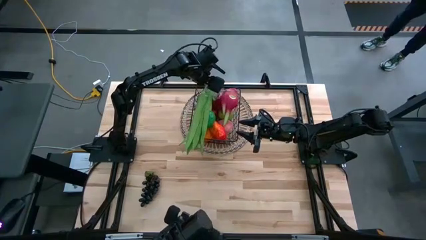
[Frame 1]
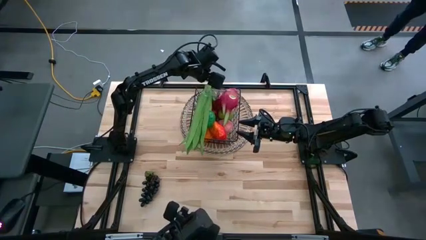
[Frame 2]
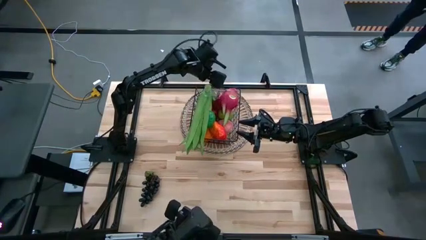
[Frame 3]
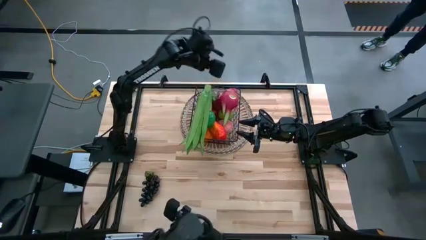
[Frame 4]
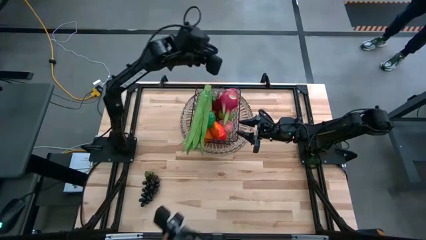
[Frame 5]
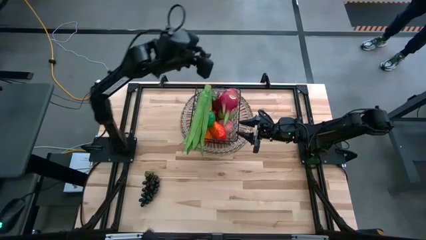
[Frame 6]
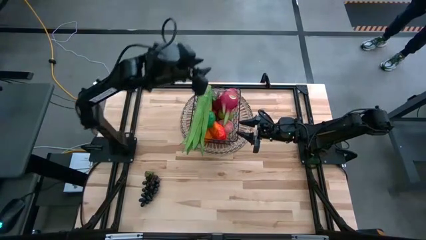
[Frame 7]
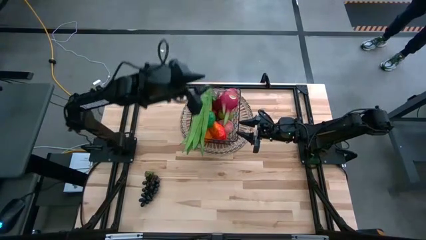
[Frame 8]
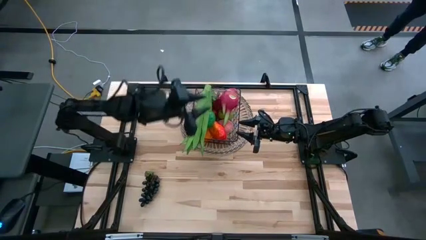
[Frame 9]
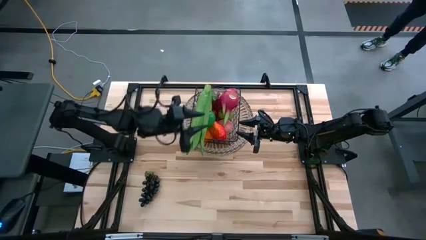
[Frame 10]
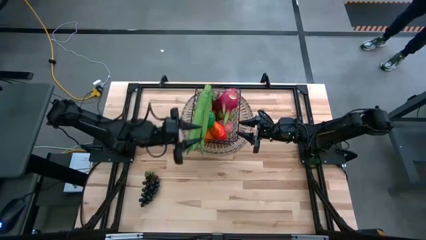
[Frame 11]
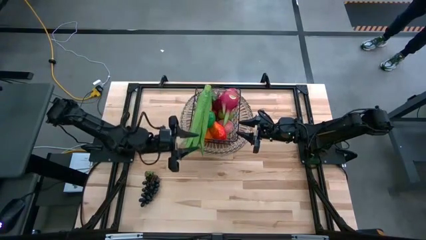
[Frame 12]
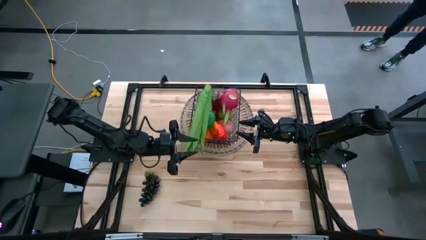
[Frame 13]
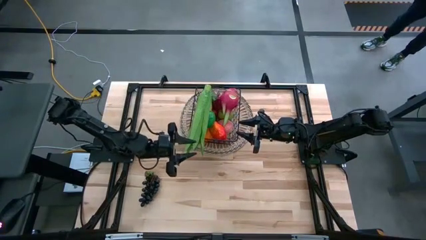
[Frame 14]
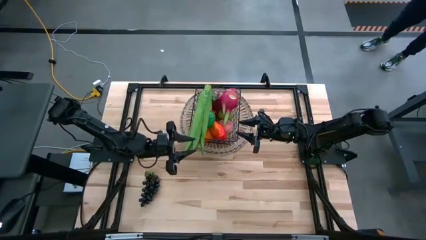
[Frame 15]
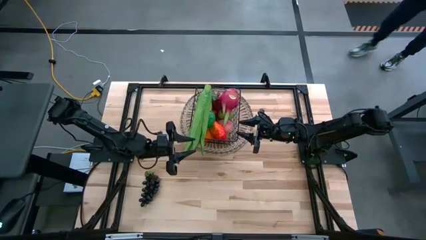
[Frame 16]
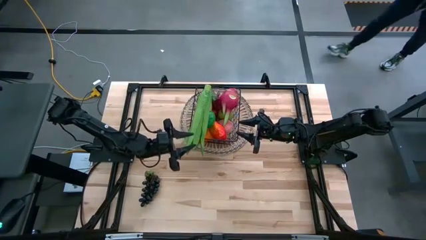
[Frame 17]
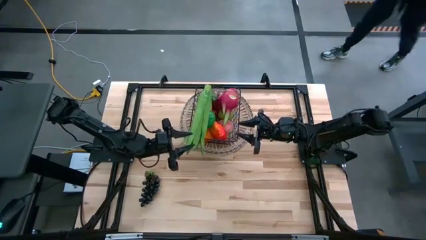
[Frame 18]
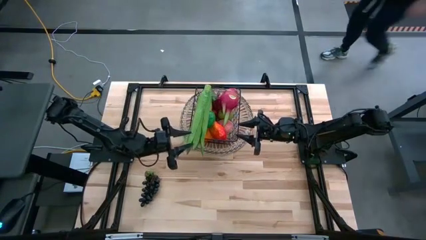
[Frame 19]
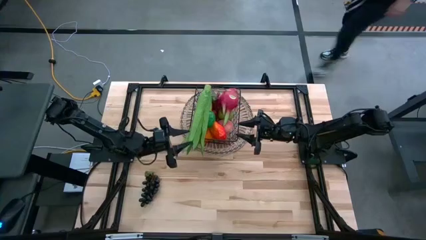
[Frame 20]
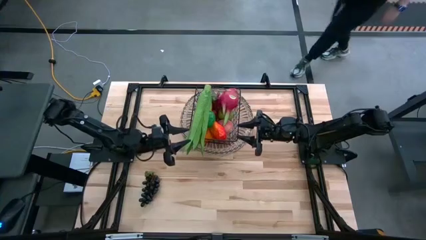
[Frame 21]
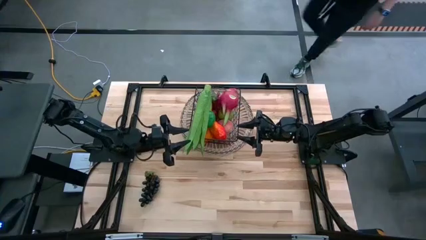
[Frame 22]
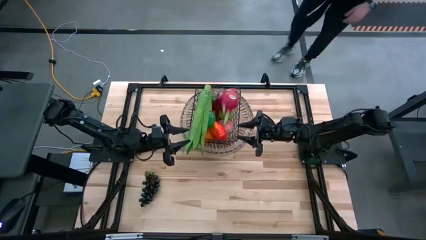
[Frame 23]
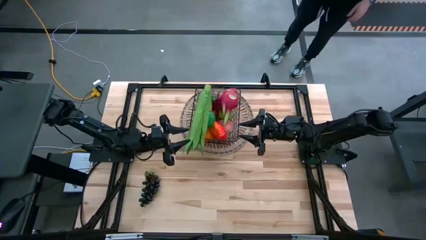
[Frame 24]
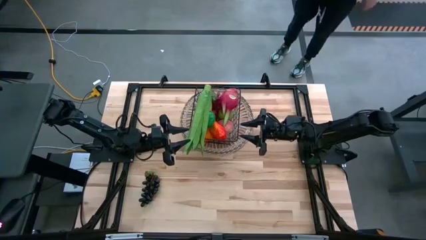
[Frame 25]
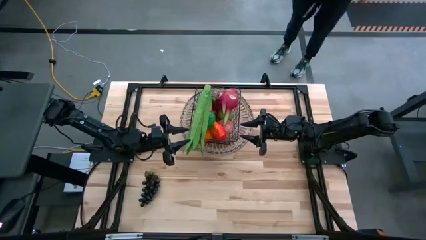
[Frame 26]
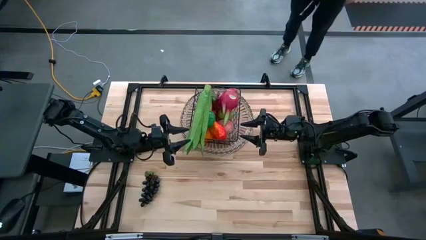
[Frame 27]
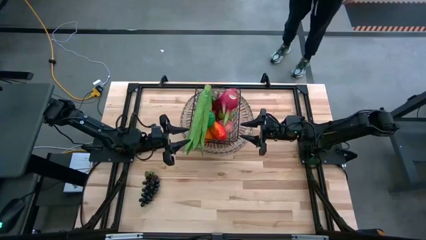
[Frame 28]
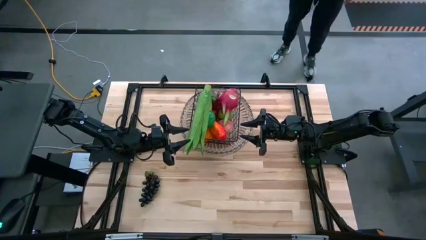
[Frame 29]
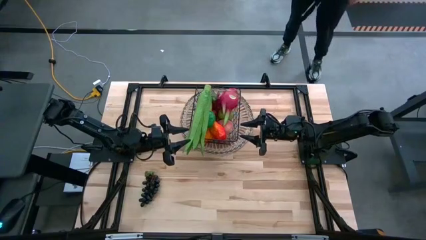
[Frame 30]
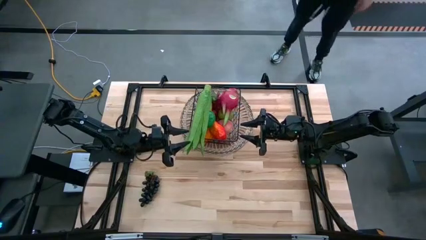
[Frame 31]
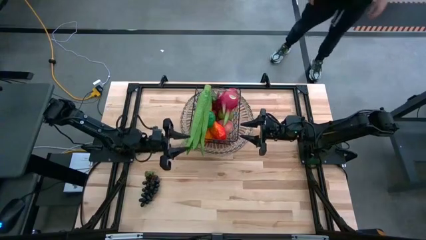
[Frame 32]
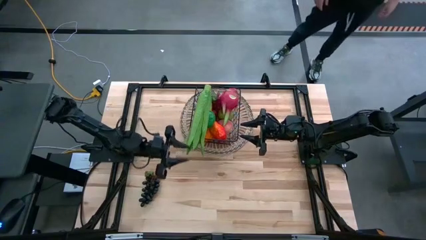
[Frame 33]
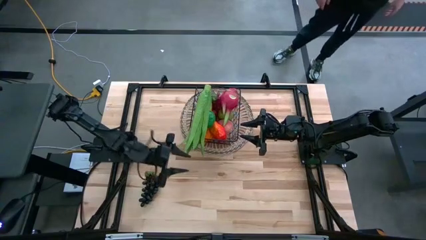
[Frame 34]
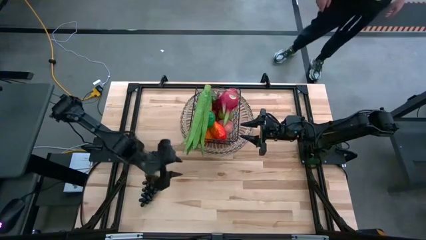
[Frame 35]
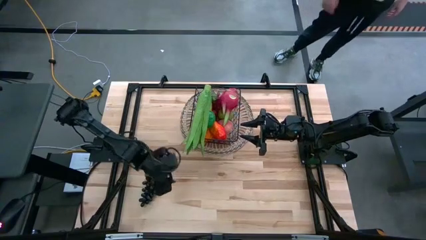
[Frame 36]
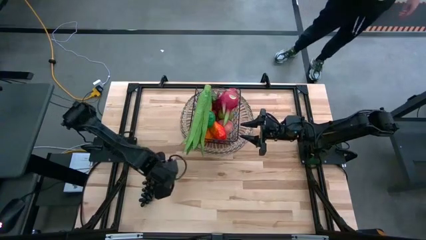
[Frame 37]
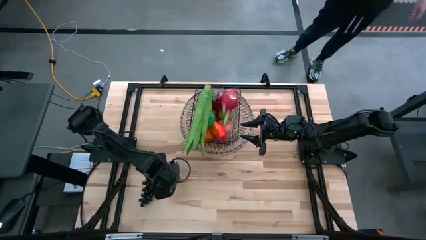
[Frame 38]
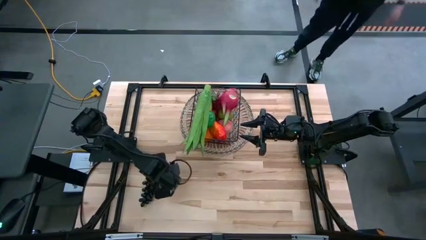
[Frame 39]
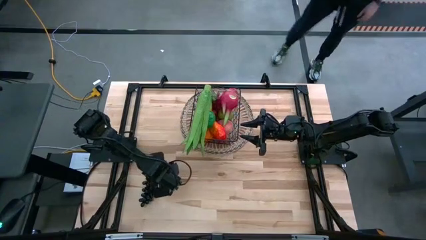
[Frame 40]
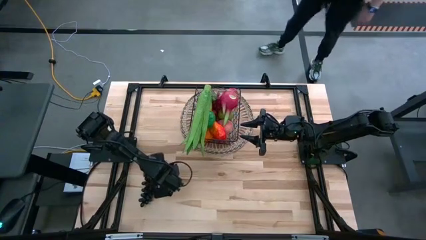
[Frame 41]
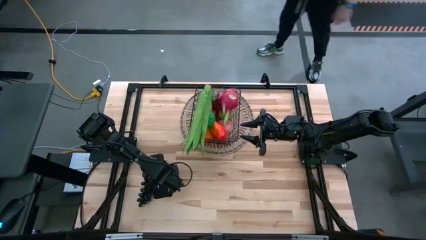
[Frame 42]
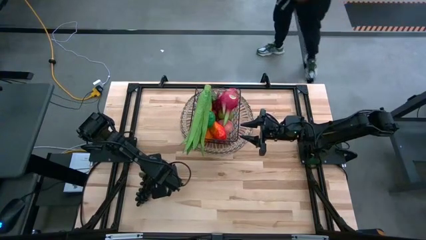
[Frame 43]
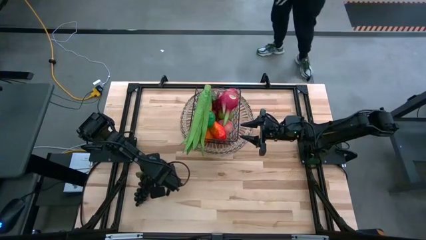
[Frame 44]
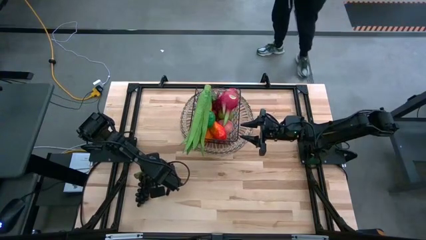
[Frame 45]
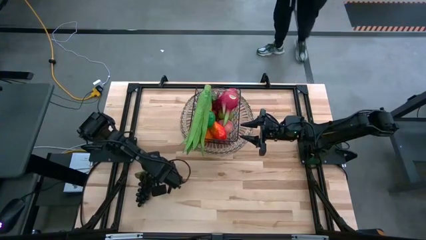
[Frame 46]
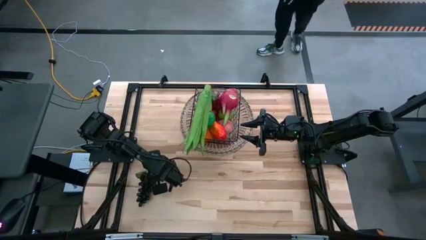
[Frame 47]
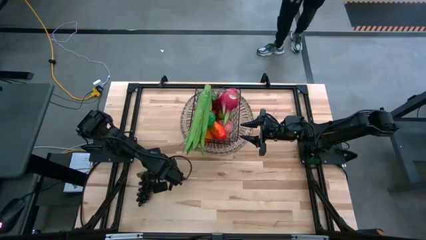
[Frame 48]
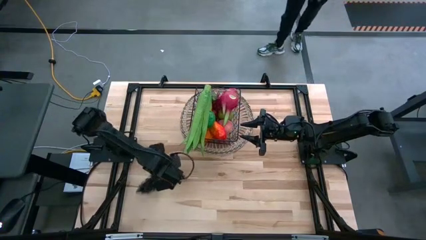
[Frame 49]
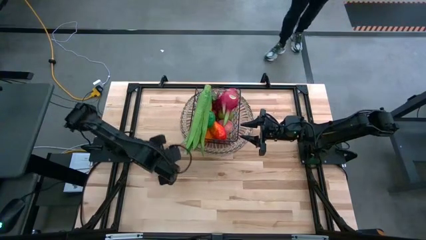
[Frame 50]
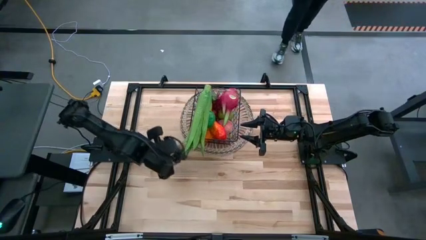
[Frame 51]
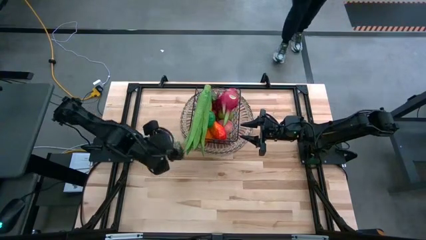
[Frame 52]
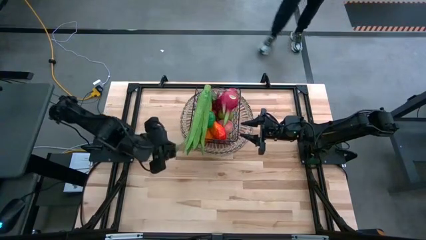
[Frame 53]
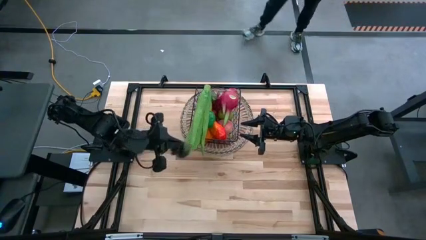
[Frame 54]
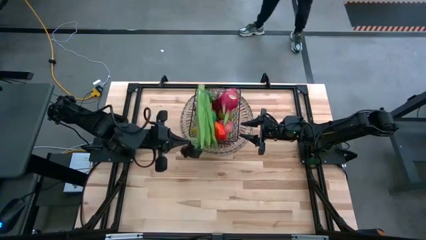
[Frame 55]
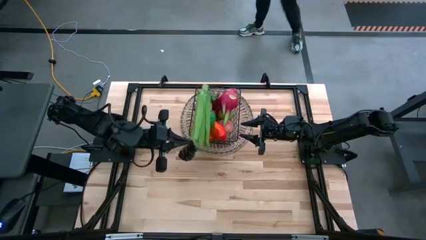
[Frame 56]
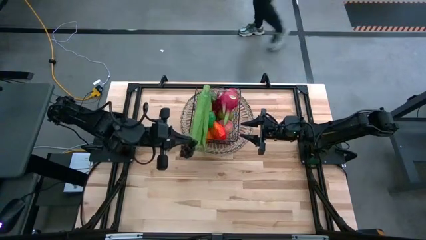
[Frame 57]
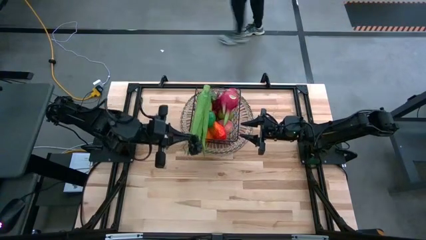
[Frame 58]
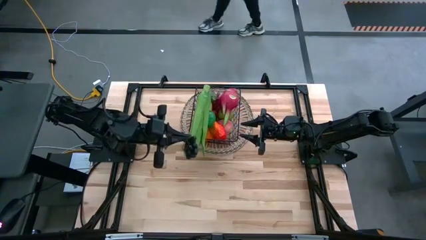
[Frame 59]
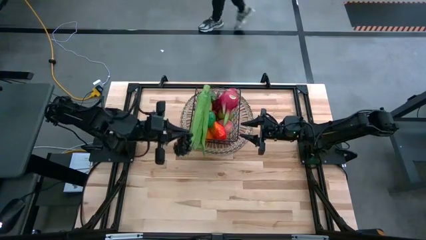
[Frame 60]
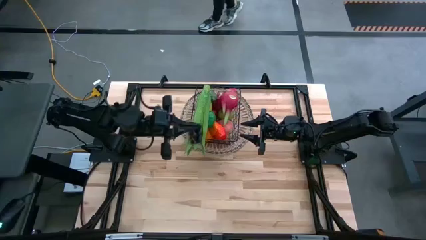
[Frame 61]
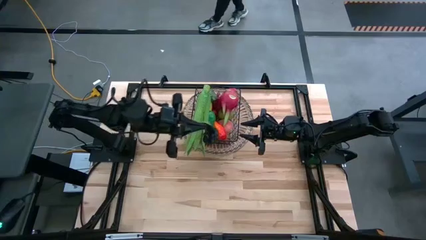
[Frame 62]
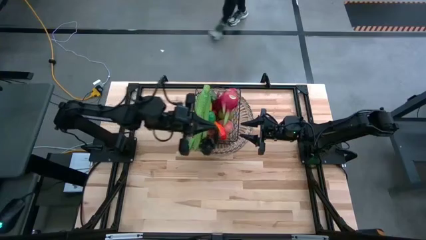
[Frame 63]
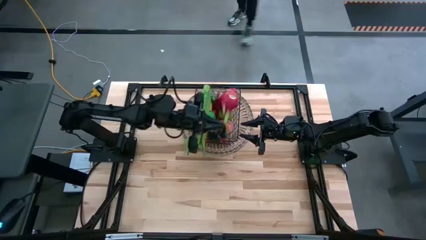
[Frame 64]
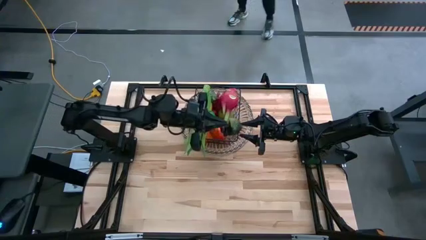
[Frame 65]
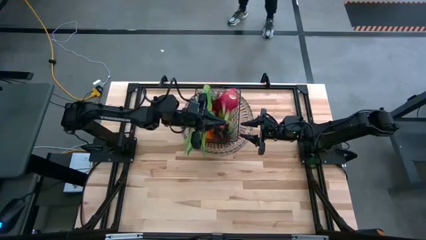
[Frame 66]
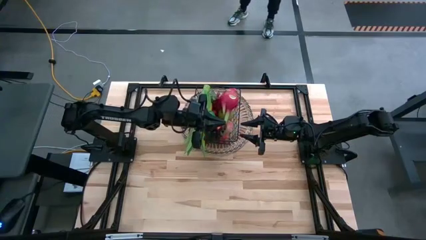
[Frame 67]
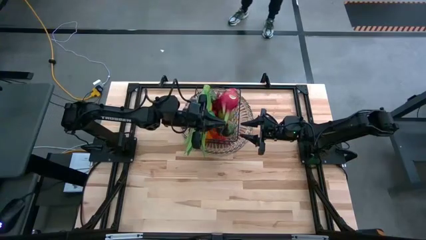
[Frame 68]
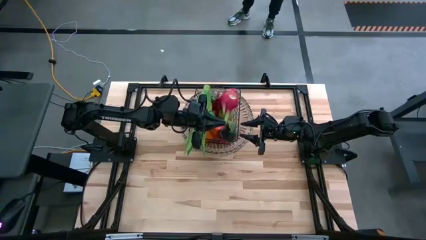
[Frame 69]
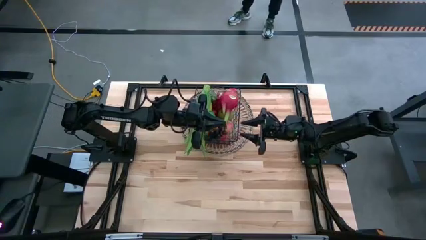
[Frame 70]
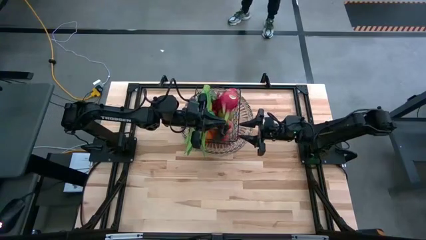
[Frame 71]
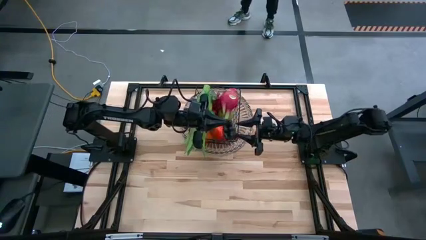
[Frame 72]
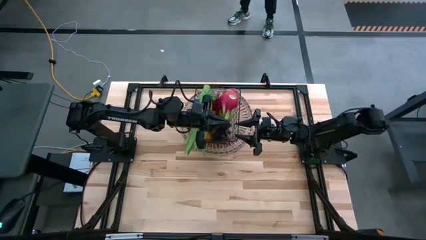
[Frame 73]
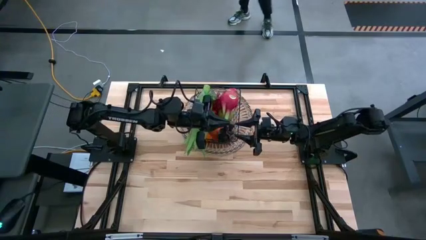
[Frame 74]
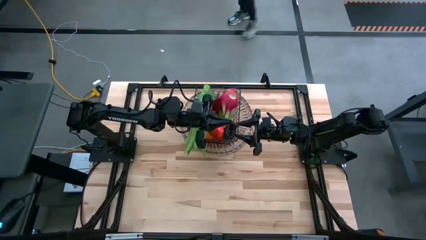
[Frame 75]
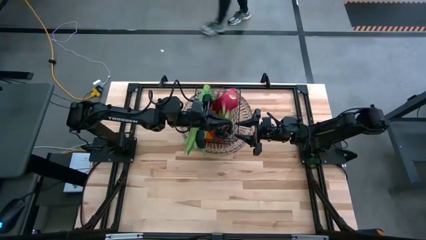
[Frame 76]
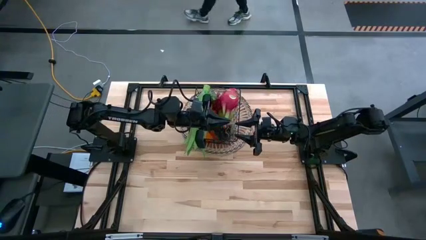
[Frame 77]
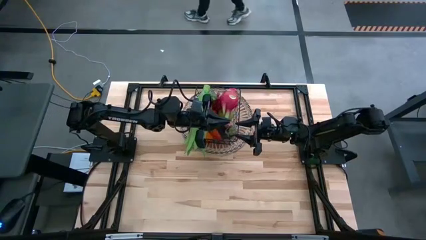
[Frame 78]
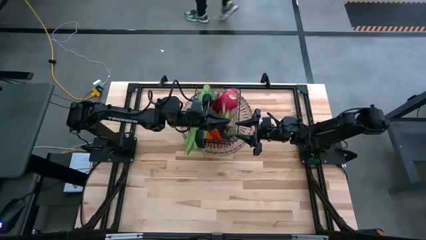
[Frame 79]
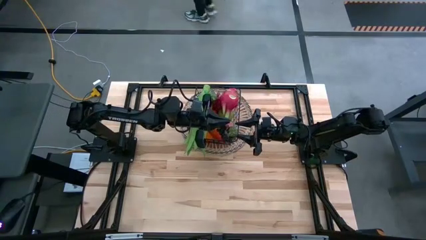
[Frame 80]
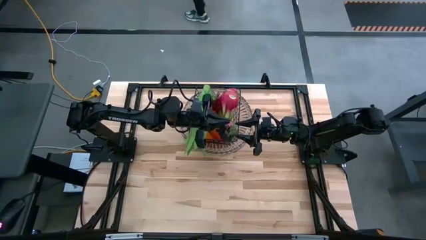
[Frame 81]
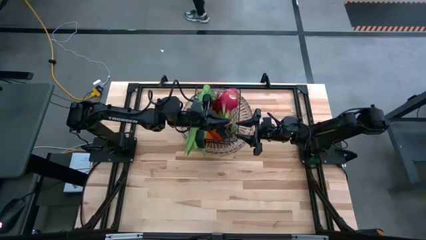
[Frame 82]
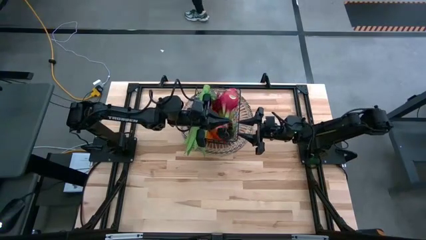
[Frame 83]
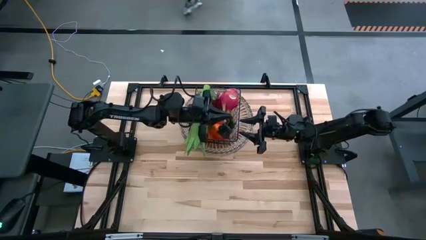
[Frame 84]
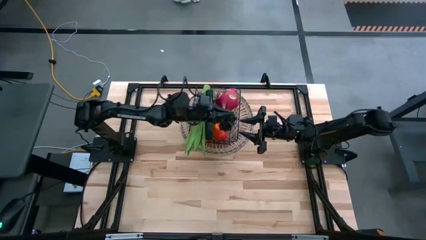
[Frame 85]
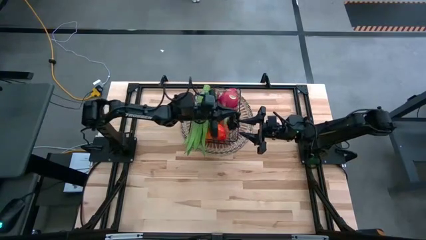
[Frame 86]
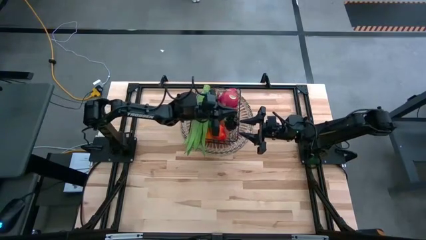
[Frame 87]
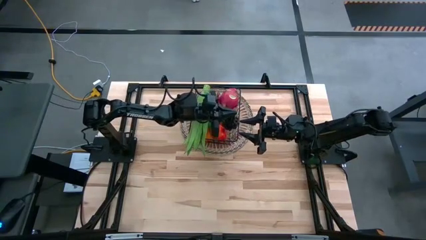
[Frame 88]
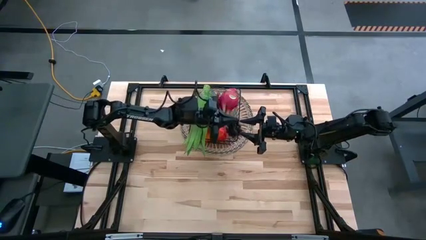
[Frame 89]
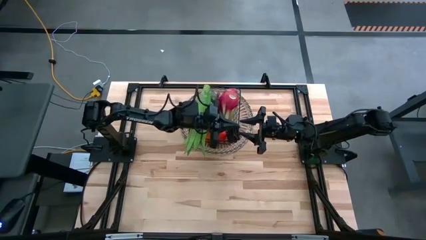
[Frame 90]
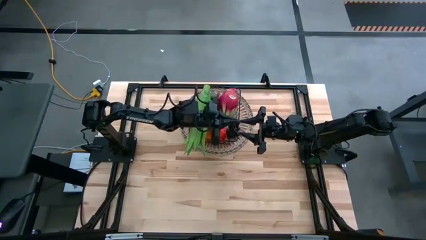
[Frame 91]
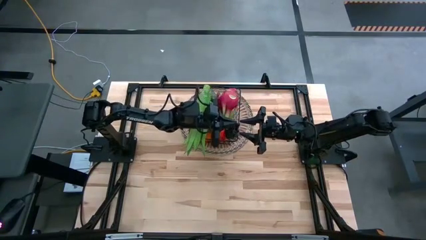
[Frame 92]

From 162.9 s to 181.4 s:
Task: Build produce basket
Put the purple grapes into the black wire basket
